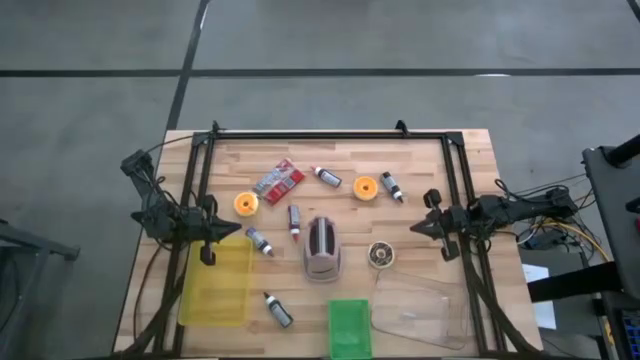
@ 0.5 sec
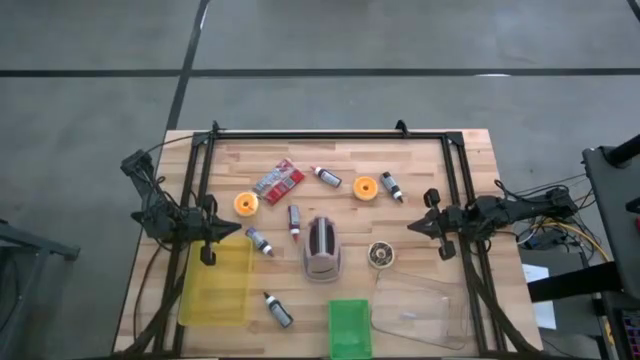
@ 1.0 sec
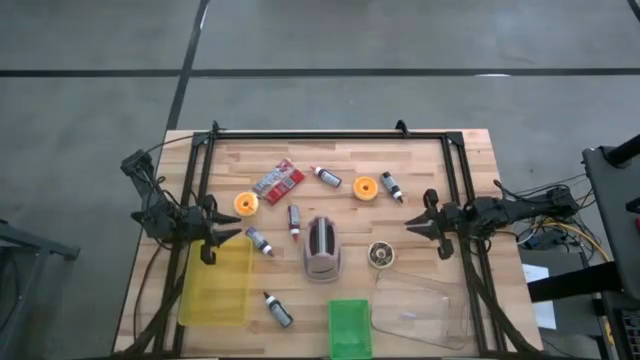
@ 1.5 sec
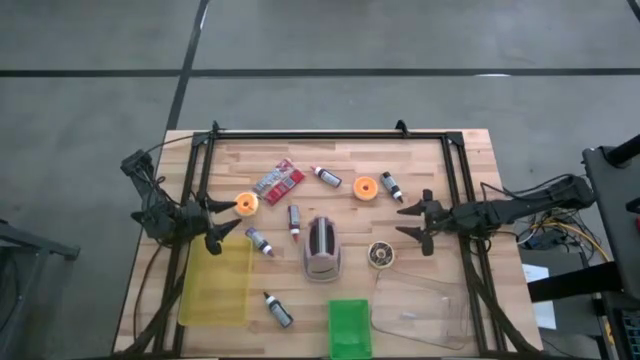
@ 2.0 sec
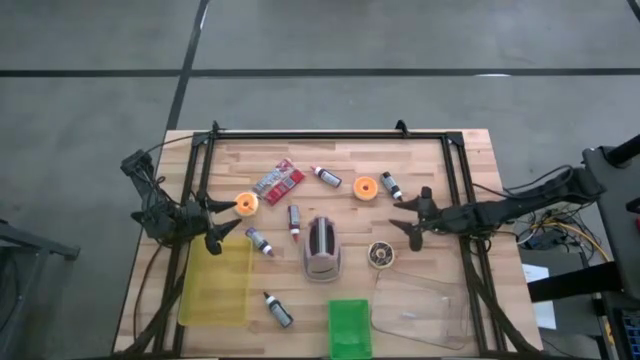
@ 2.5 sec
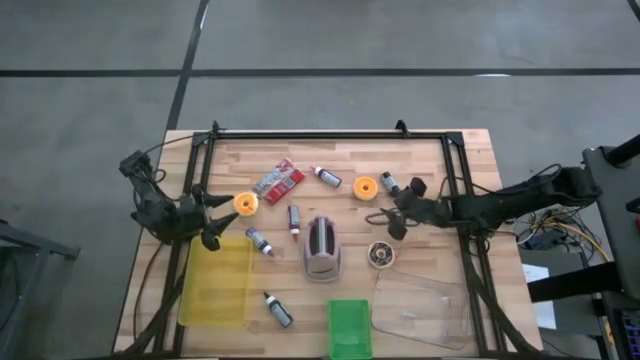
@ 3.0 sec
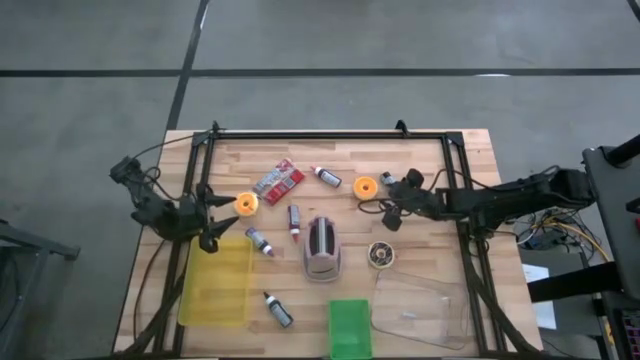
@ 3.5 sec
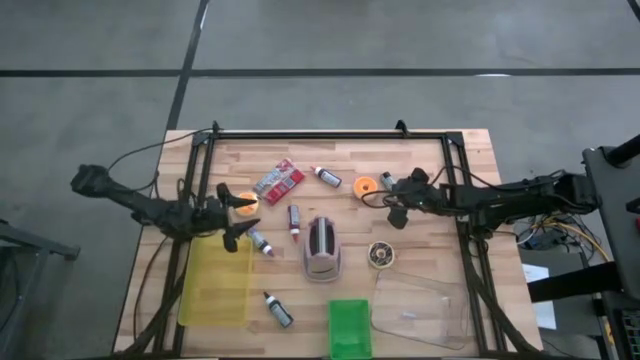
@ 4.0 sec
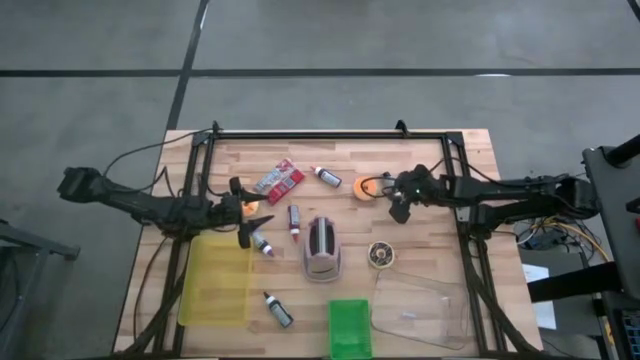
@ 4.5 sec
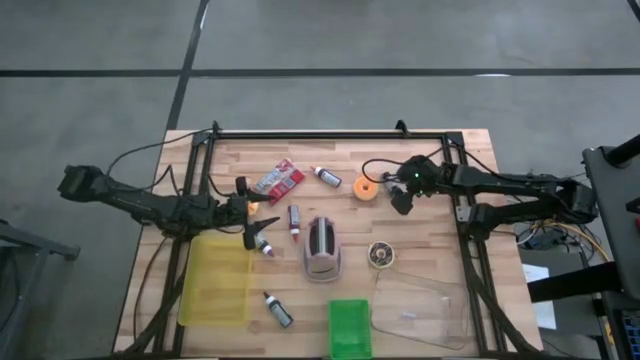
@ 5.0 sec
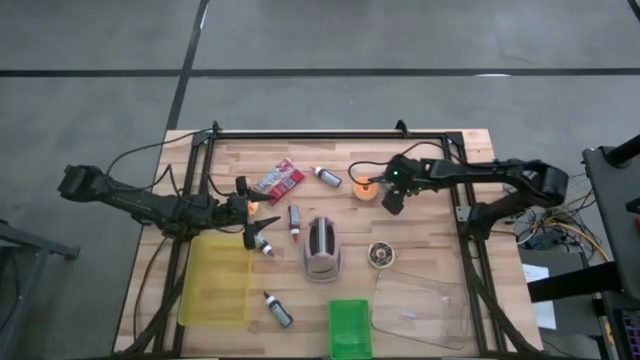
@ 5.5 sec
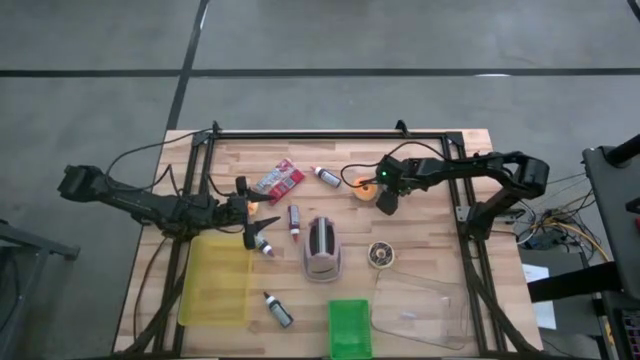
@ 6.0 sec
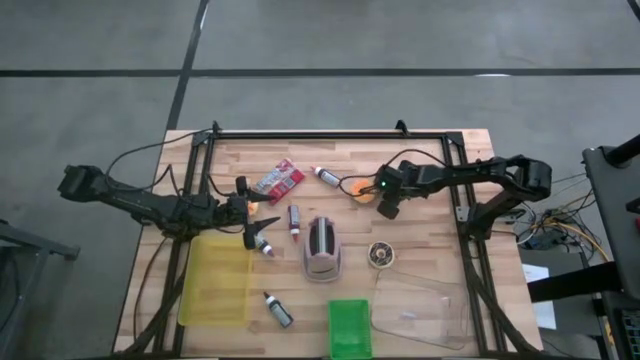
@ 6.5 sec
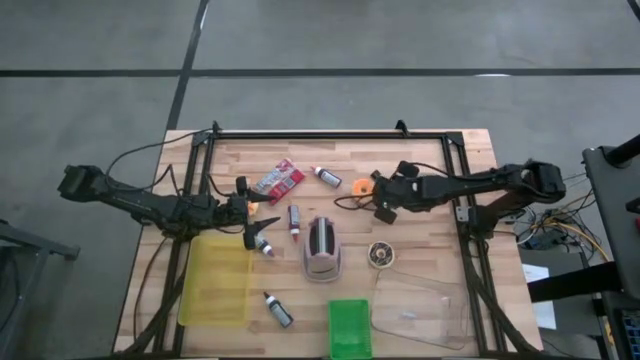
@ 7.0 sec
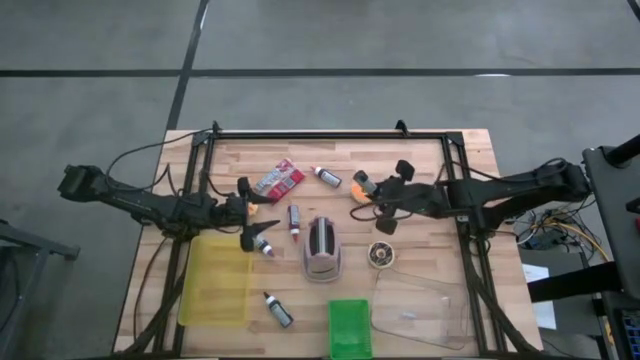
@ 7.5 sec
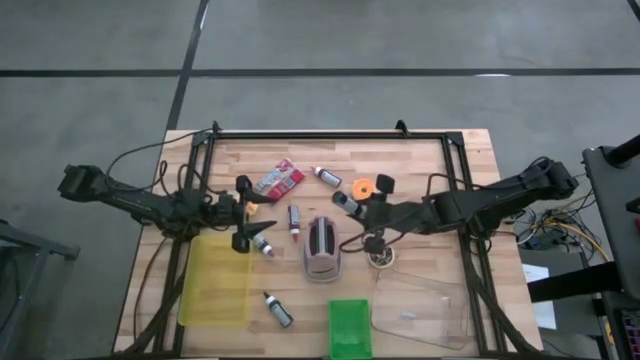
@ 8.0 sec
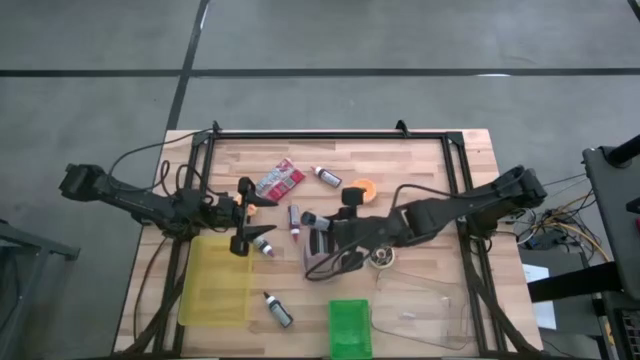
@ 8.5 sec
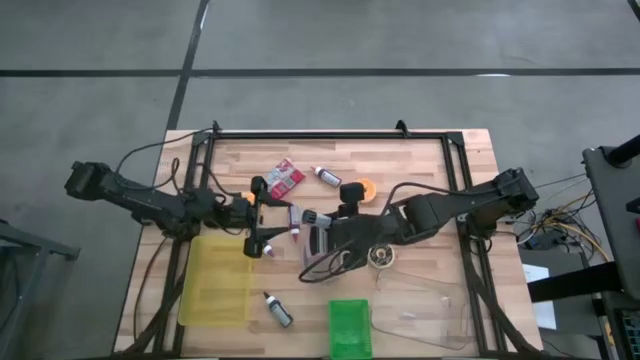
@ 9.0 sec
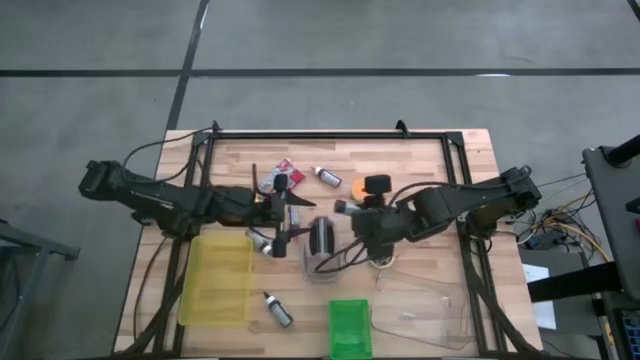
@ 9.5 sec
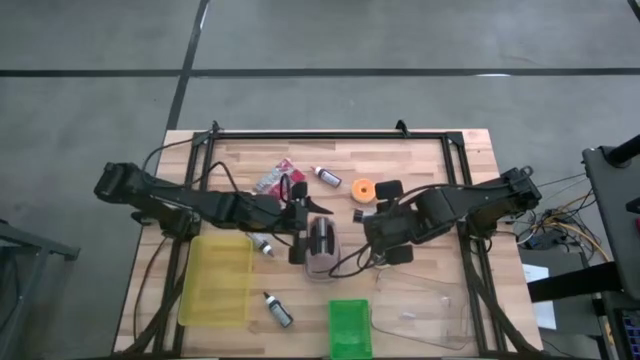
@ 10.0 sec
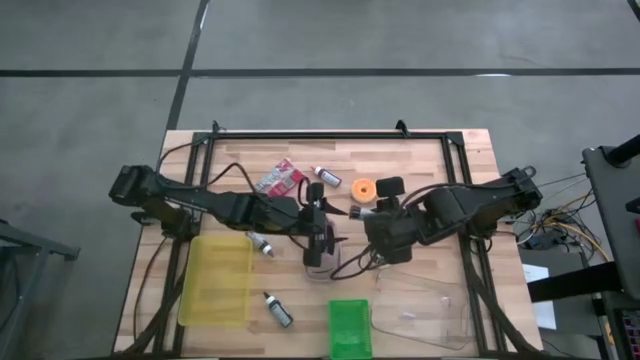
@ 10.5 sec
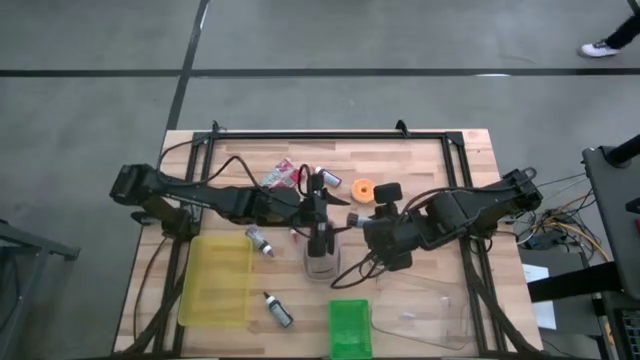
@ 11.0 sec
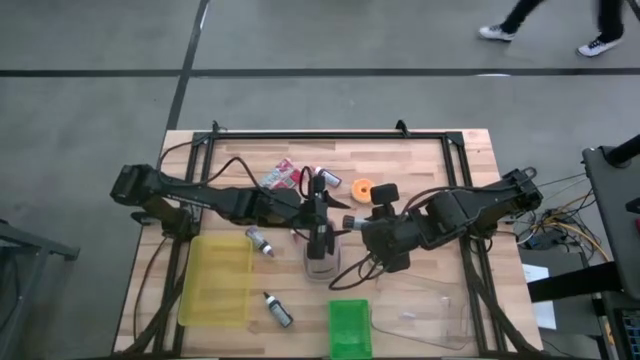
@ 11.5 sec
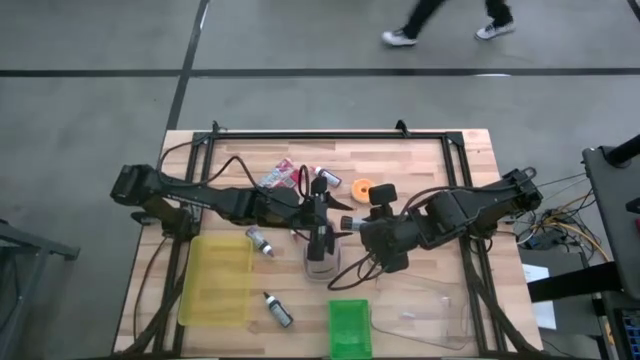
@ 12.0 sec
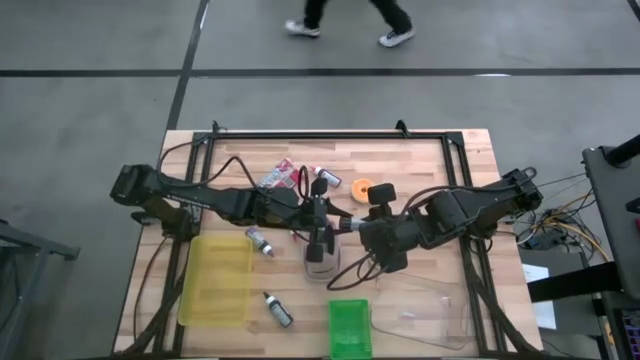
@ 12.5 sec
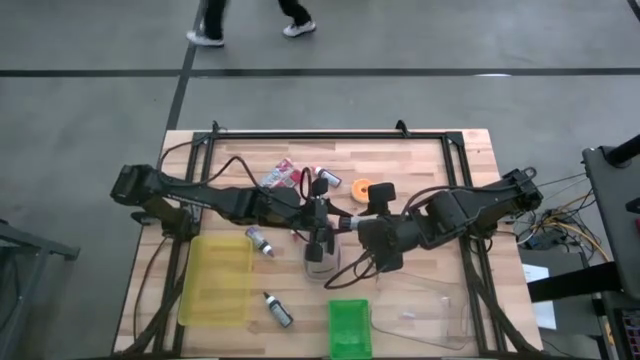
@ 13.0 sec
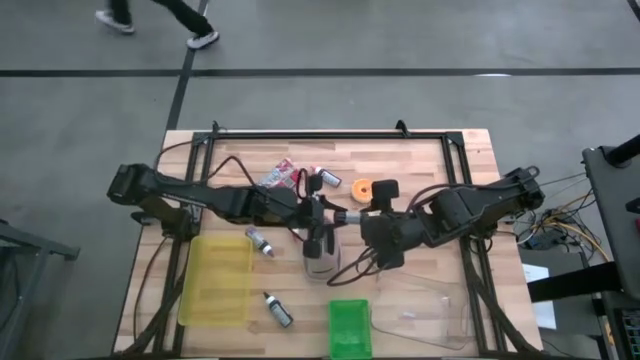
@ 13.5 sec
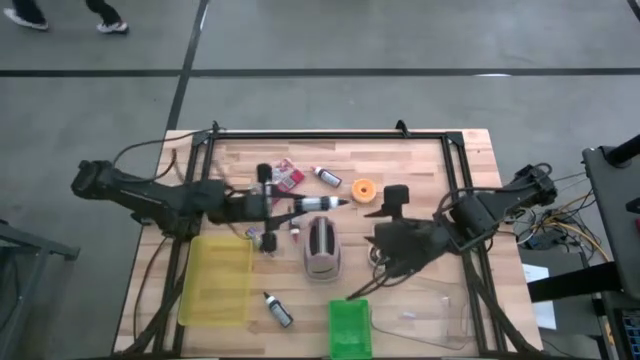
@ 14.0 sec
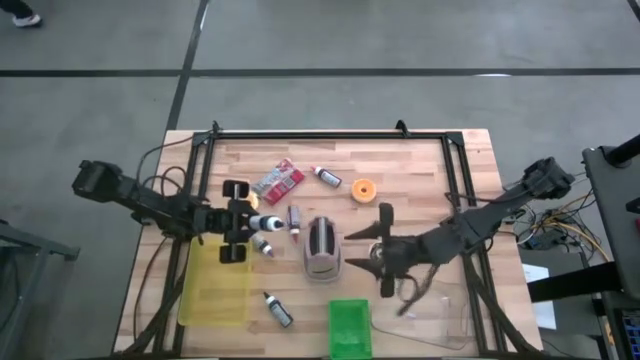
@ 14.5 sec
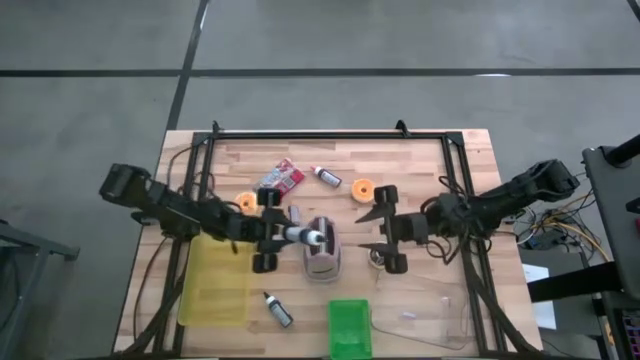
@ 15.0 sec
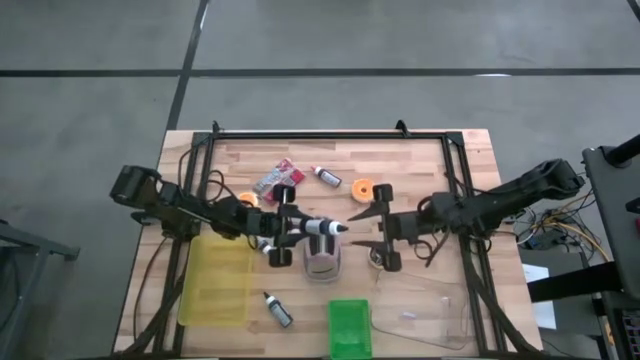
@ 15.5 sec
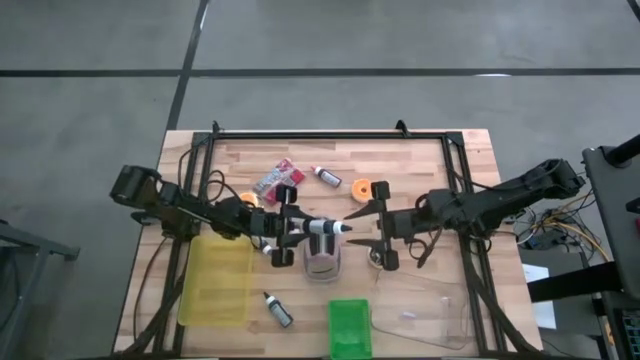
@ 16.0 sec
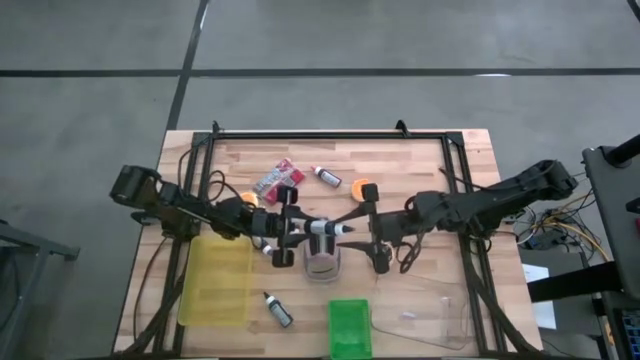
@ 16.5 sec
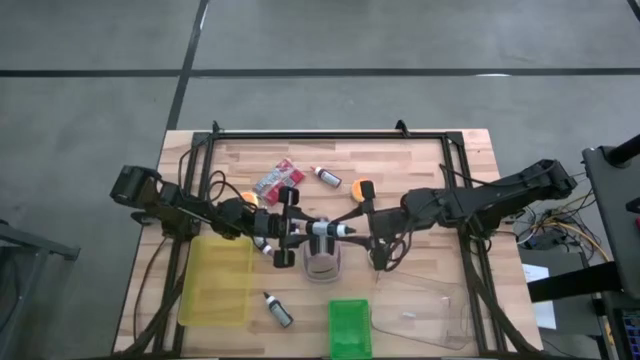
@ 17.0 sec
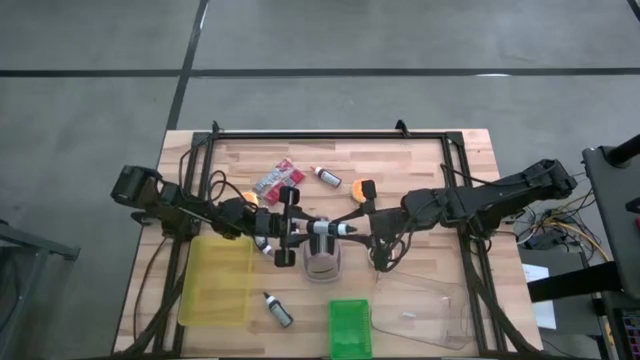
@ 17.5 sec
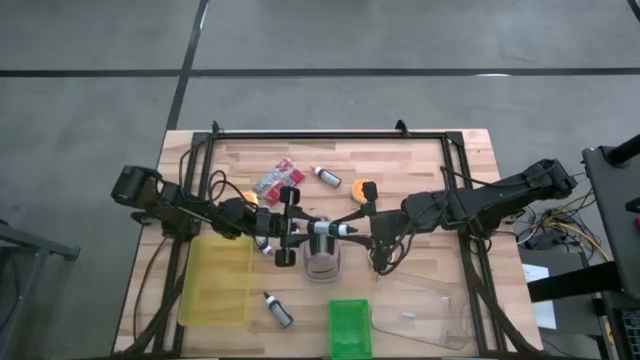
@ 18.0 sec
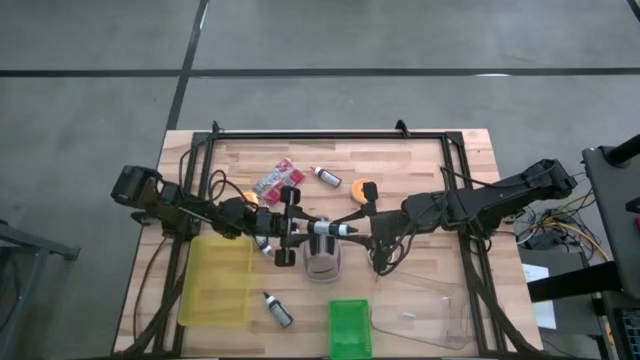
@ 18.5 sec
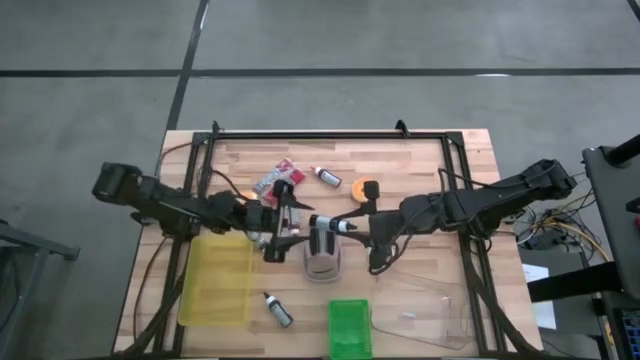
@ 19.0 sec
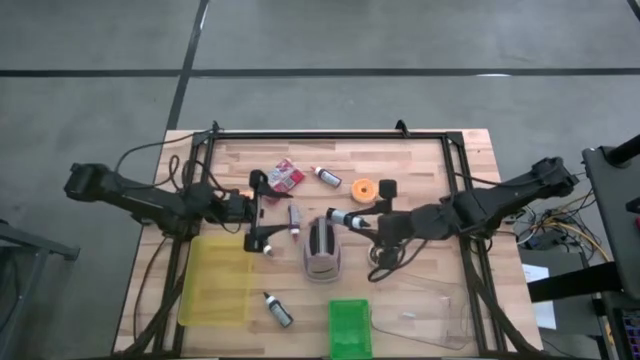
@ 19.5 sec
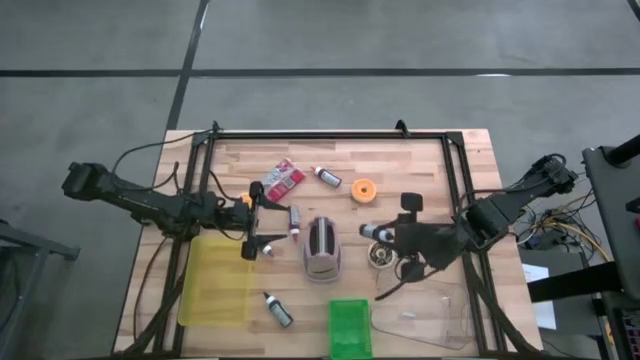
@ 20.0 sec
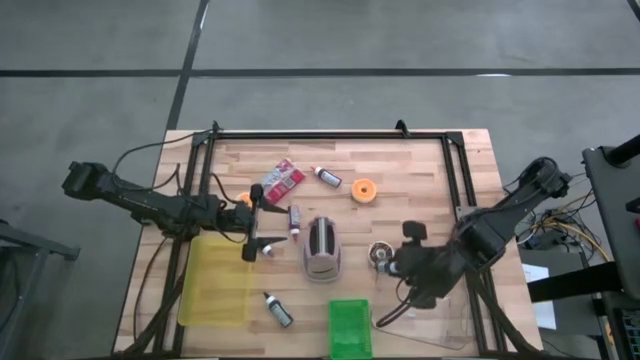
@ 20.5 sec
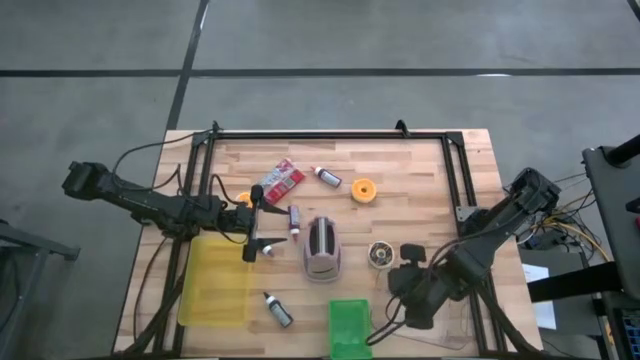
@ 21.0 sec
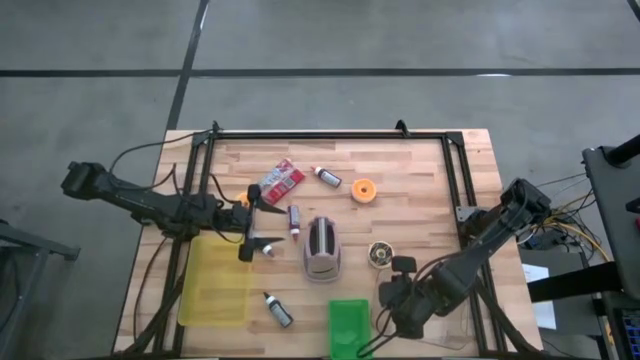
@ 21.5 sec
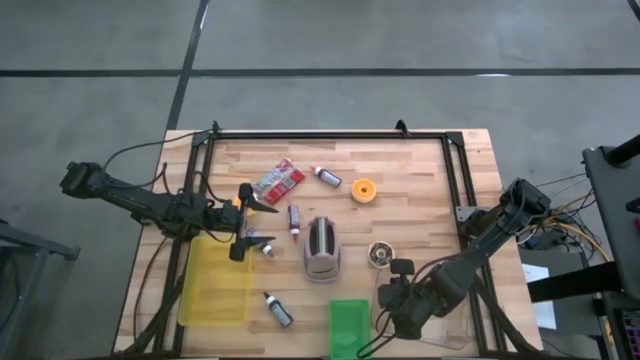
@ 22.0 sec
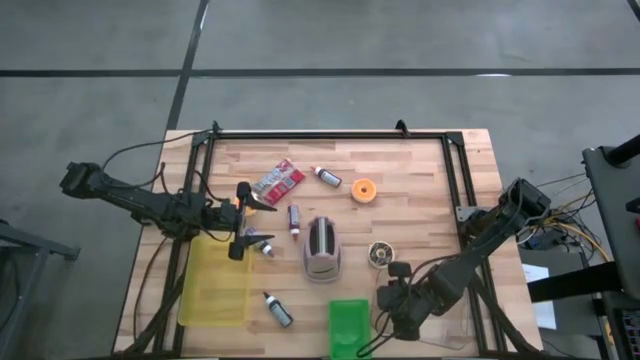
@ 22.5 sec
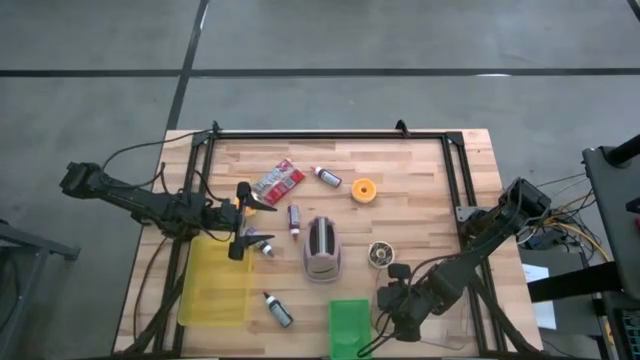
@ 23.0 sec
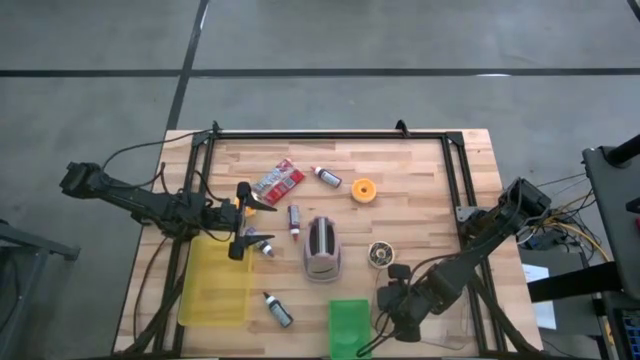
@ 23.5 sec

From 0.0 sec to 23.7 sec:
Task: Pick & Place Food Item
Put the top black food coloring bottle into the transparent bin
